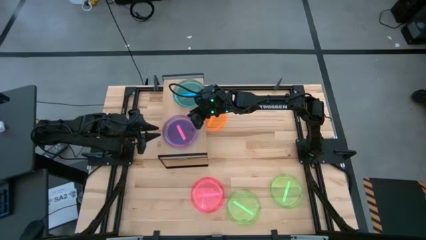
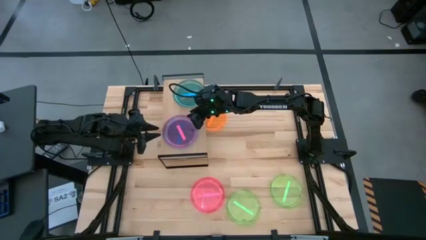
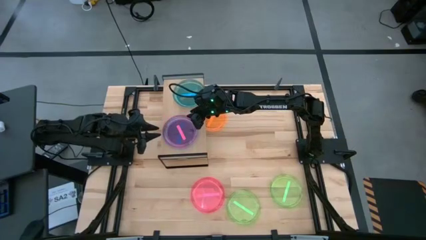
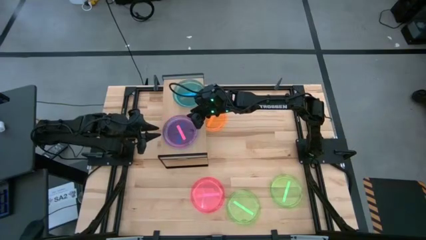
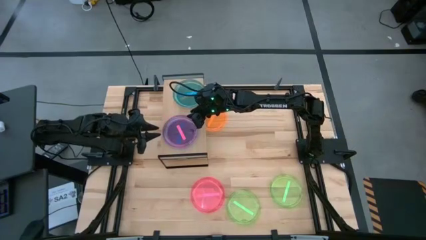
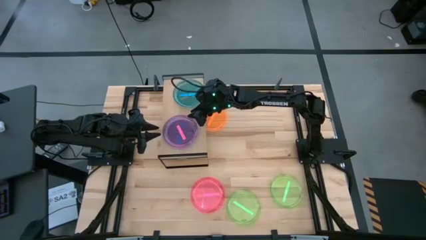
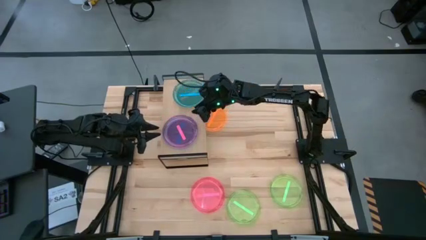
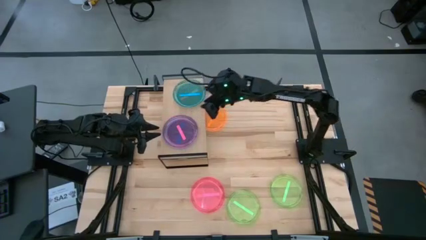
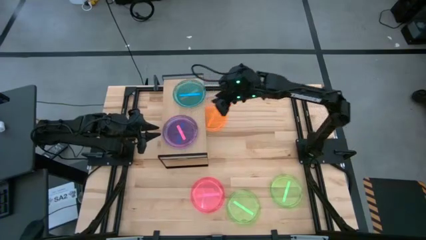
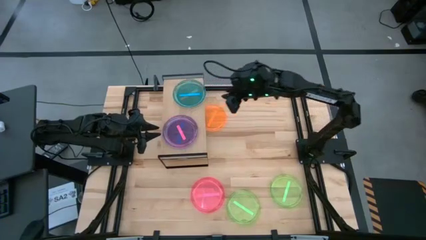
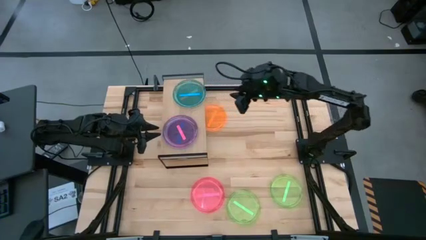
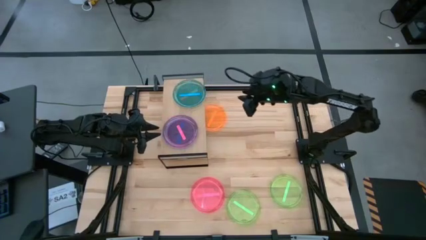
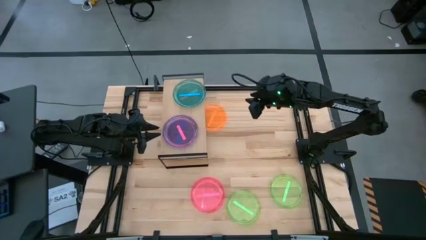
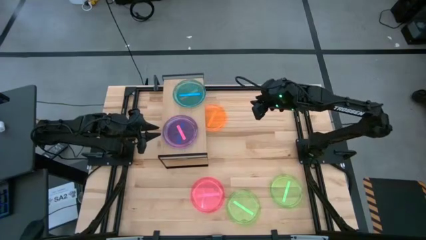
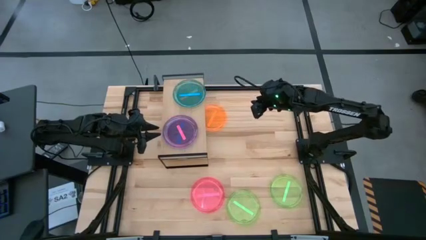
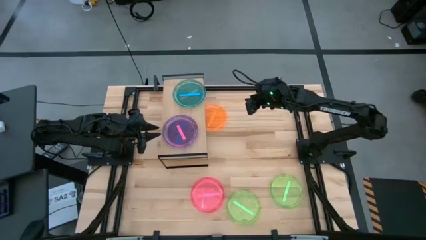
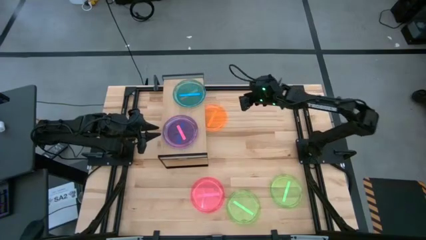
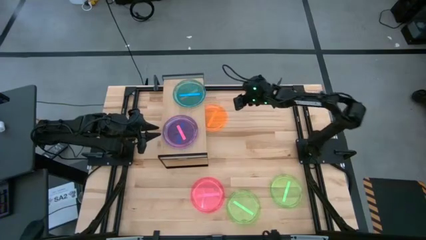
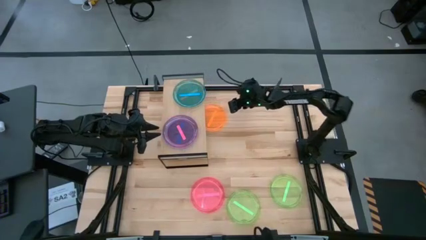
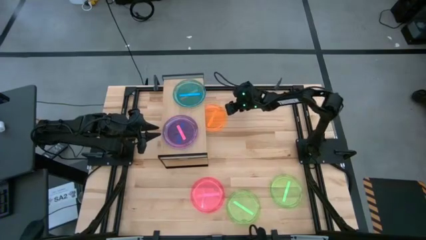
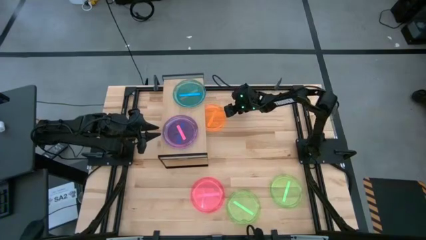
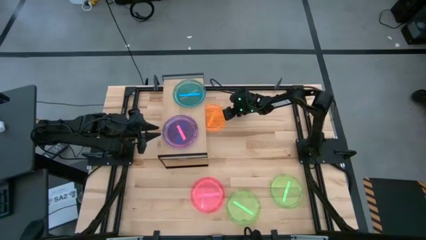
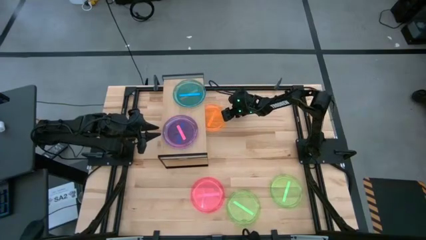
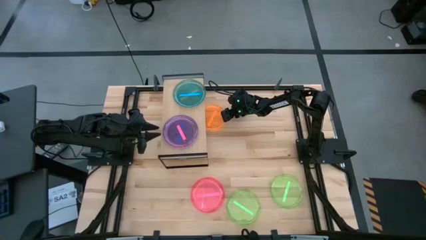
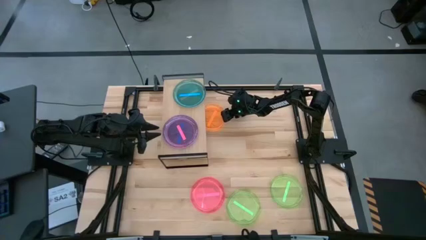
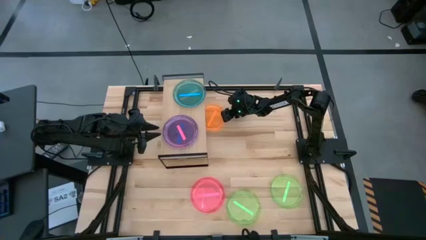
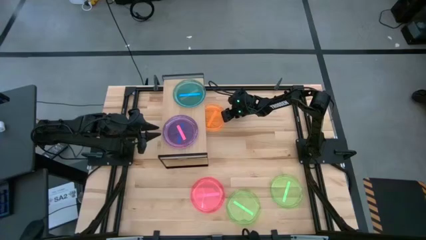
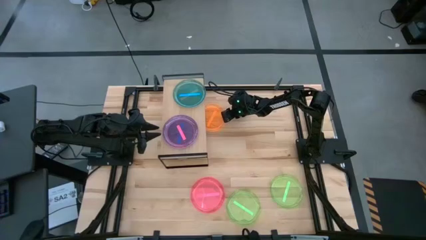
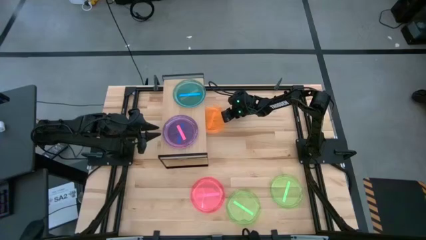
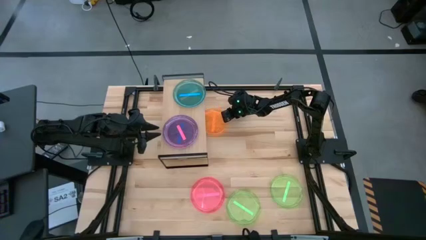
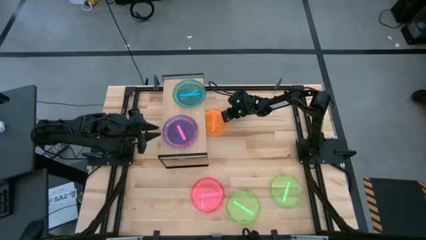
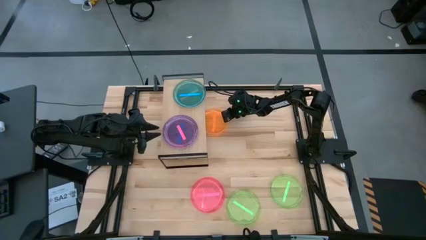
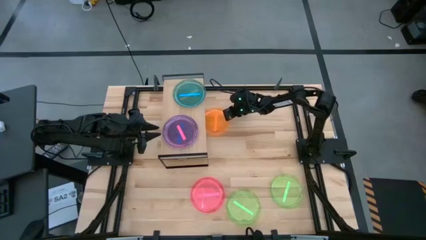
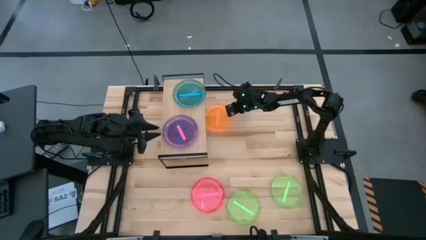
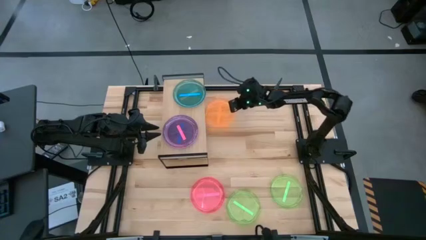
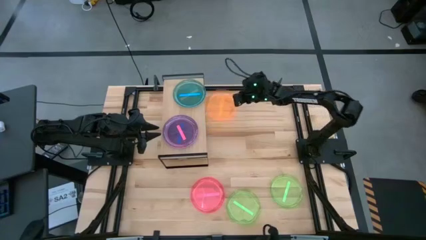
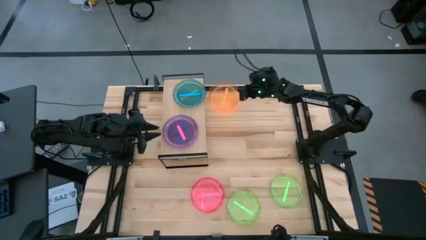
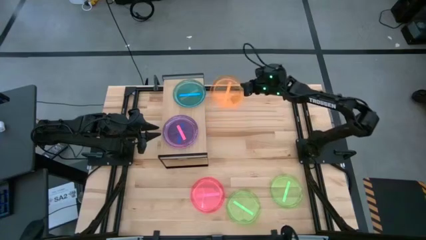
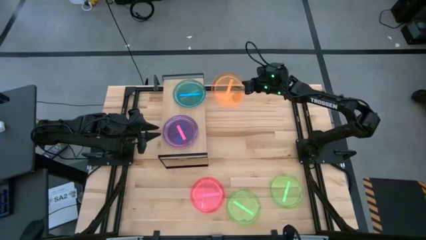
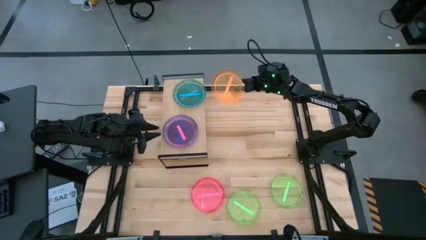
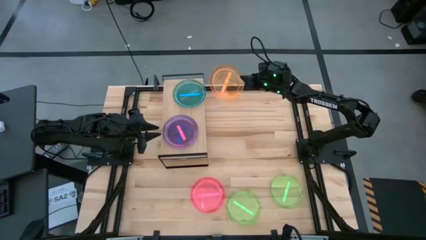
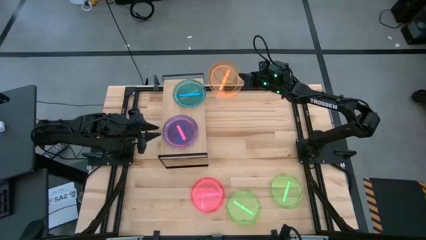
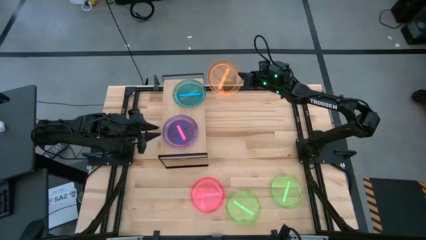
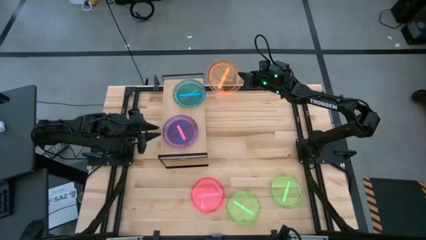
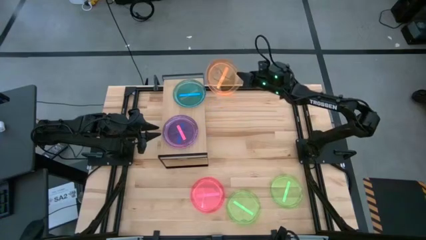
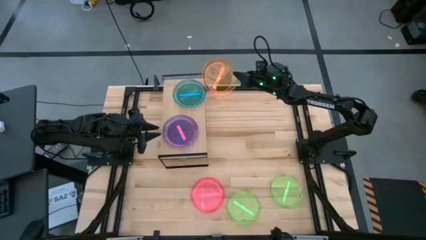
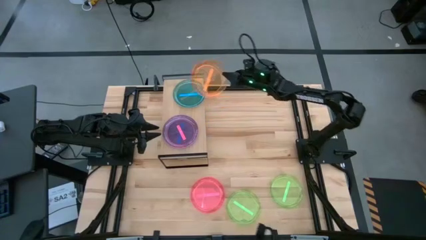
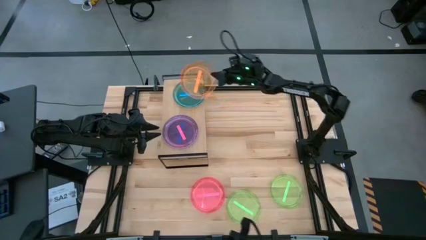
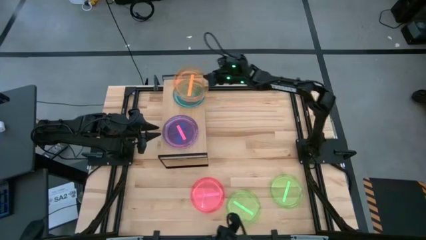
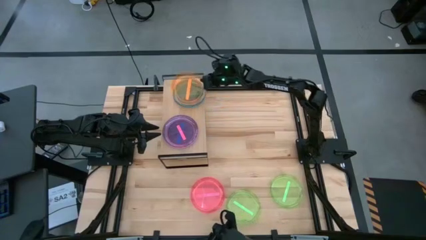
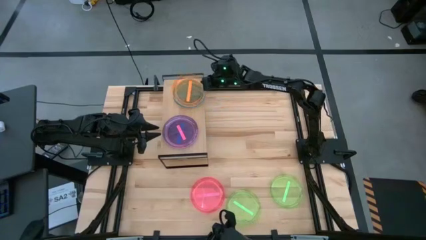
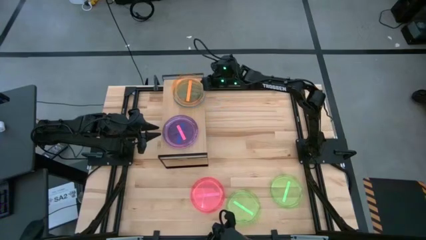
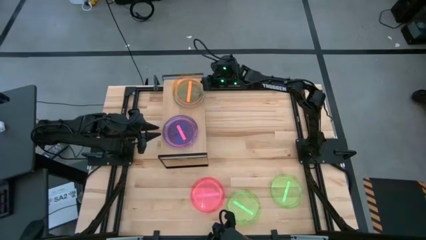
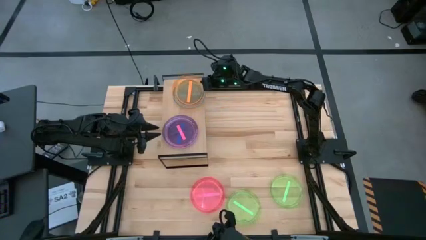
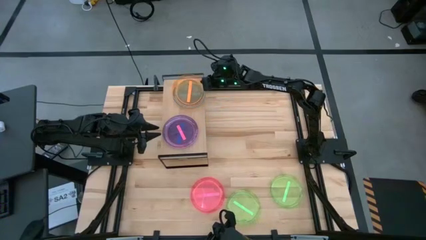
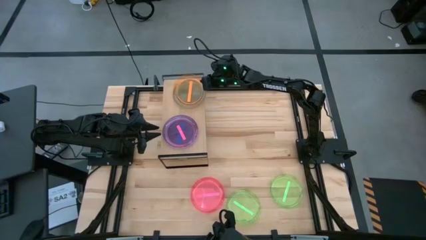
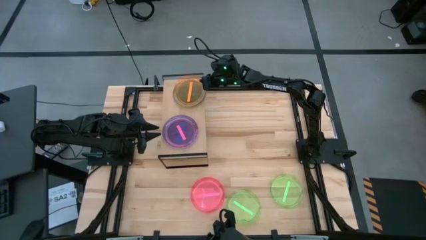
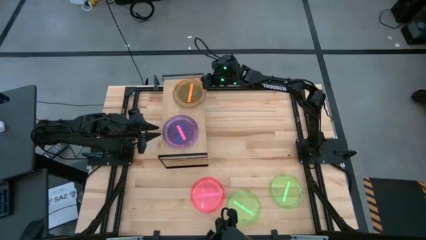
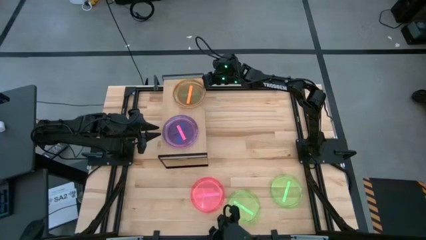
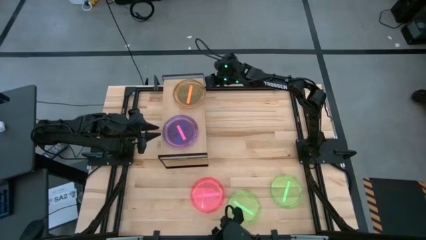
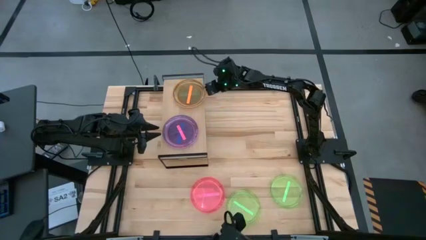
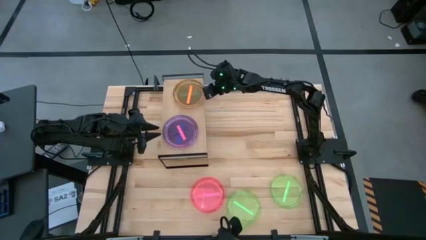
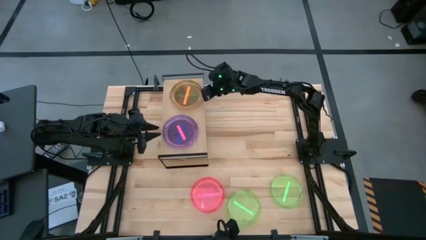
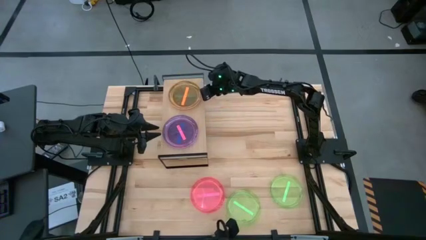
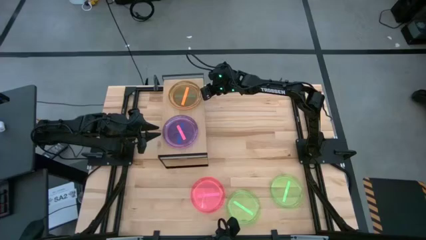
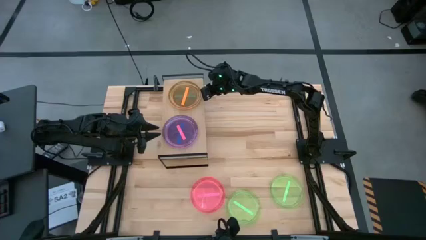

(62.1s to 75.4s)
Task: Place and stack plates onto a shelf
Stack the orange plate on top of the blue plate on the shelf
